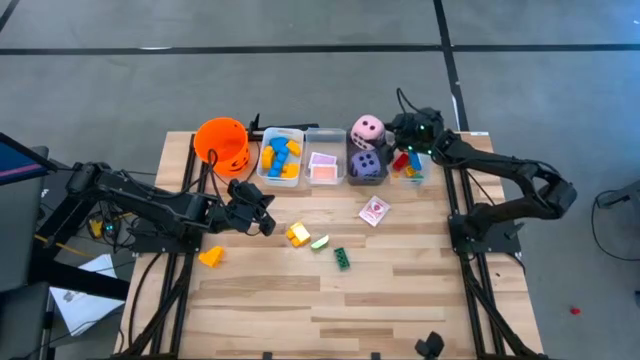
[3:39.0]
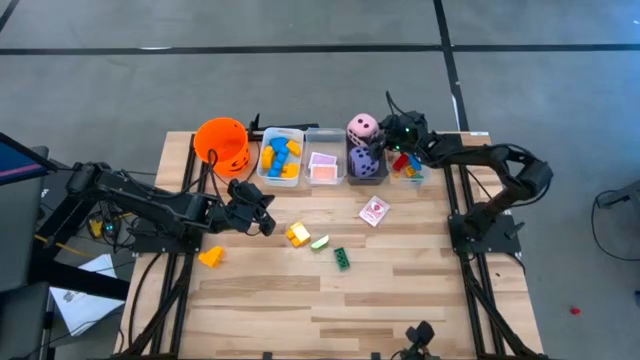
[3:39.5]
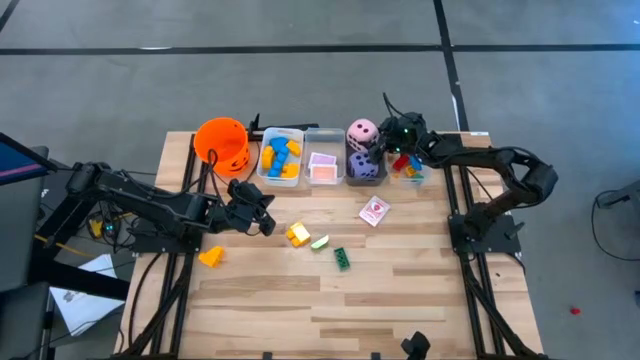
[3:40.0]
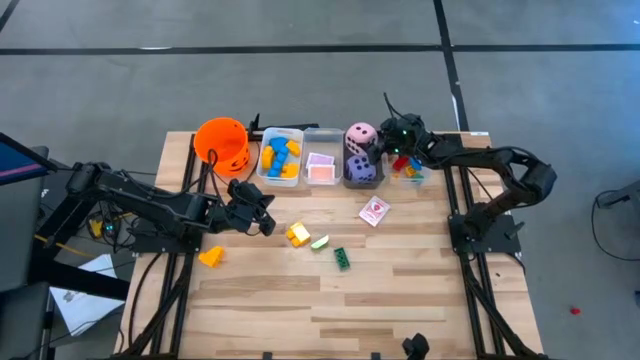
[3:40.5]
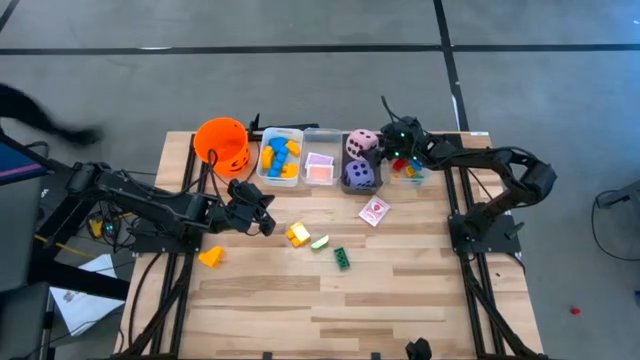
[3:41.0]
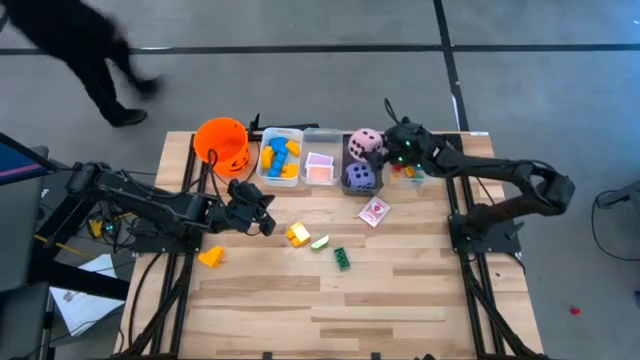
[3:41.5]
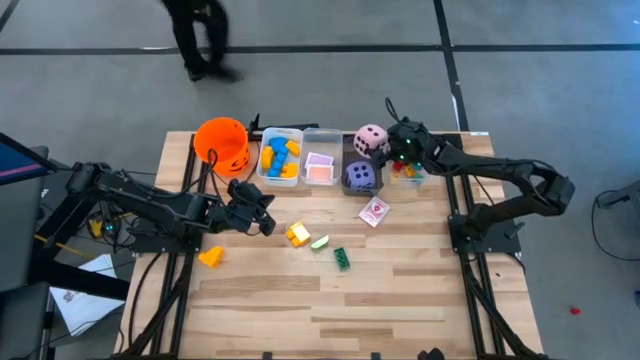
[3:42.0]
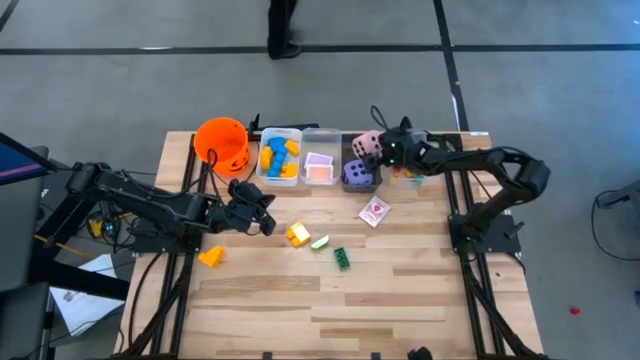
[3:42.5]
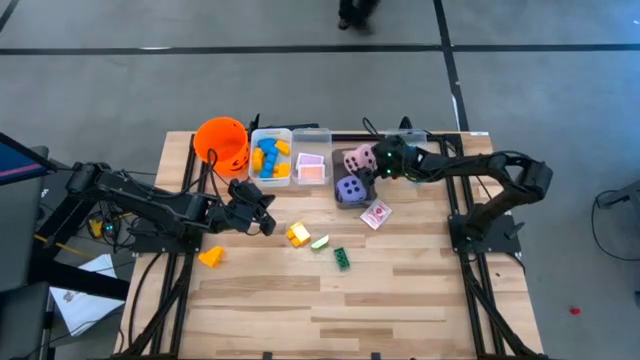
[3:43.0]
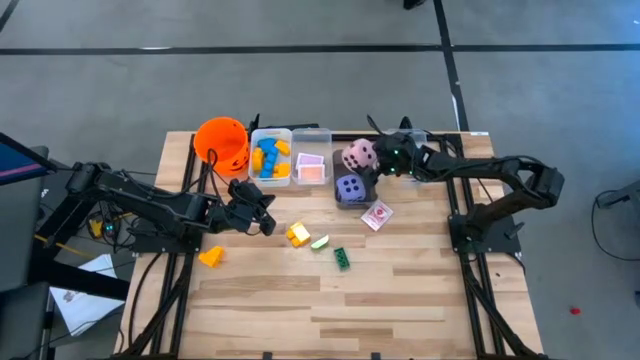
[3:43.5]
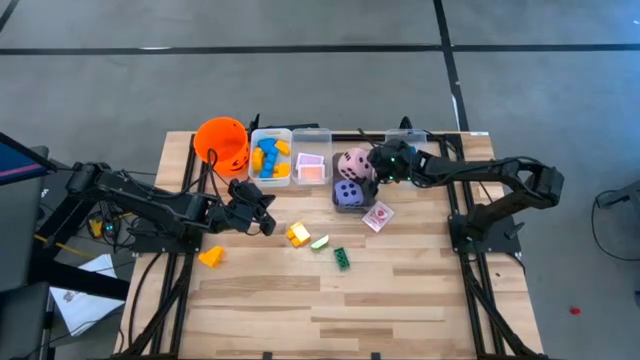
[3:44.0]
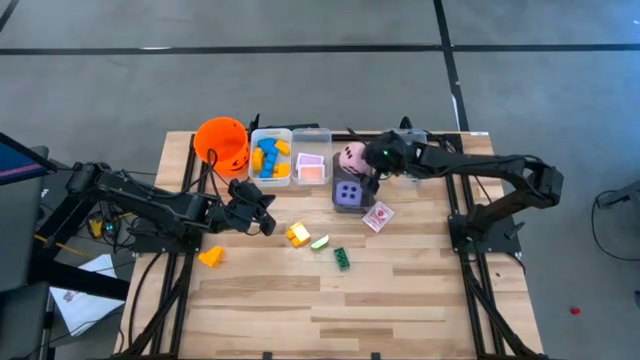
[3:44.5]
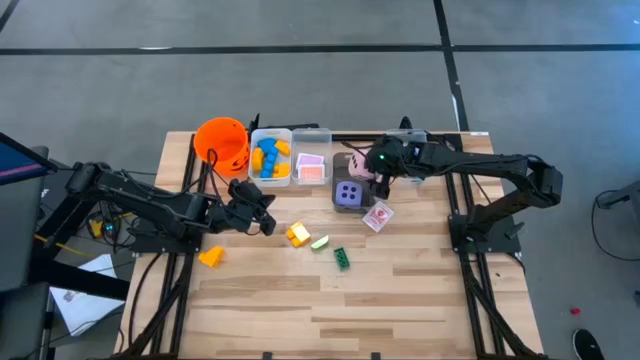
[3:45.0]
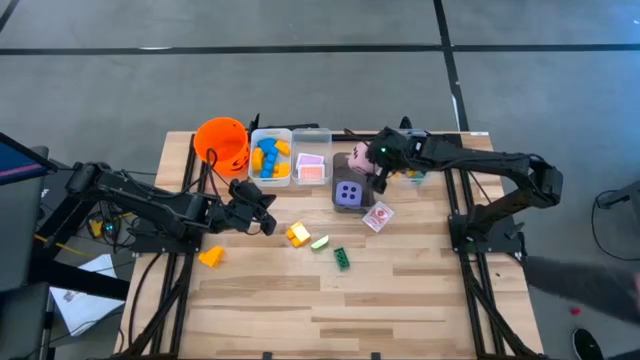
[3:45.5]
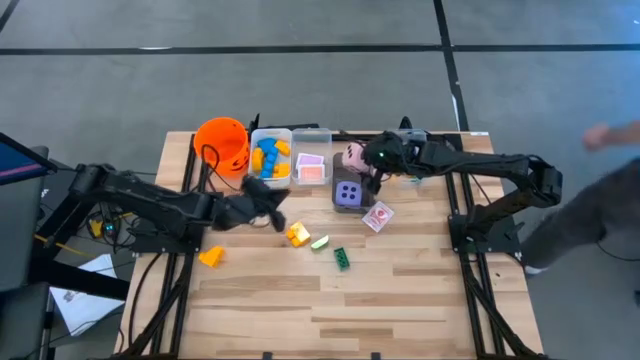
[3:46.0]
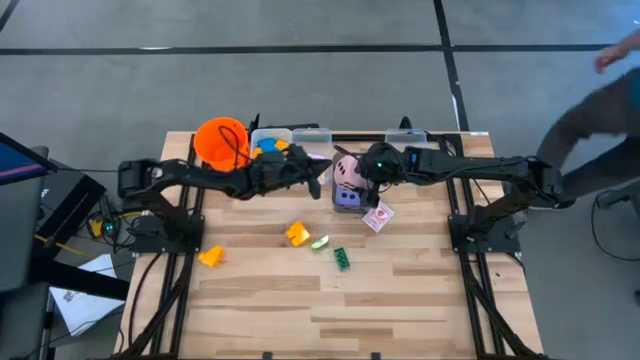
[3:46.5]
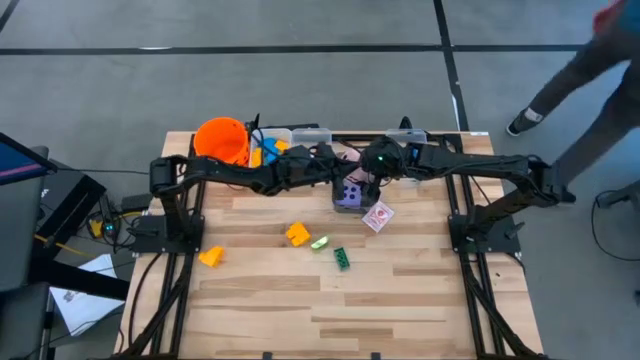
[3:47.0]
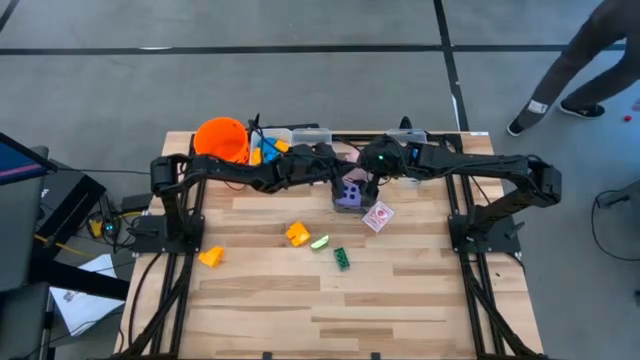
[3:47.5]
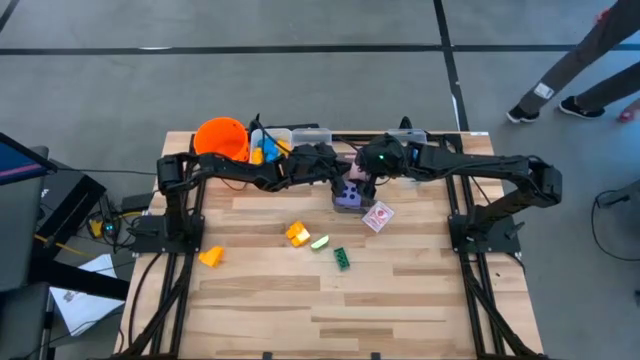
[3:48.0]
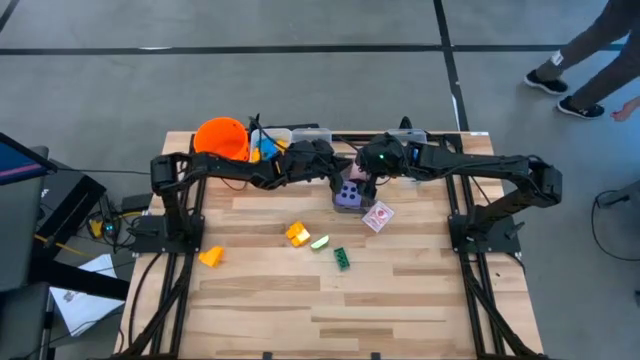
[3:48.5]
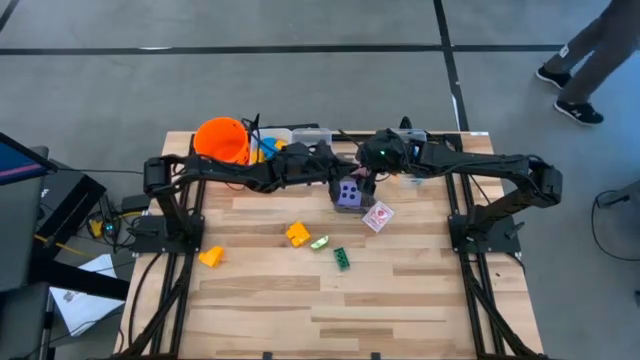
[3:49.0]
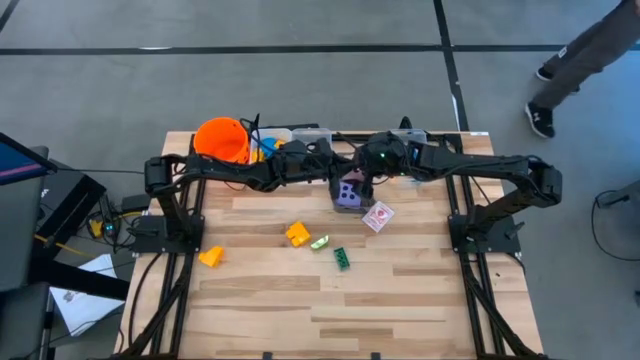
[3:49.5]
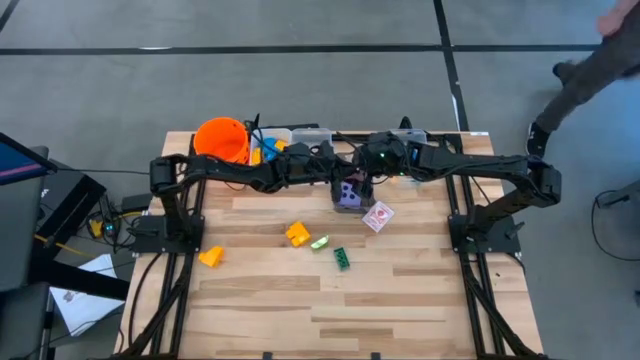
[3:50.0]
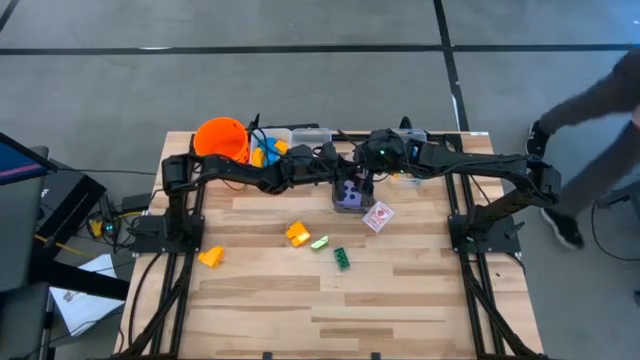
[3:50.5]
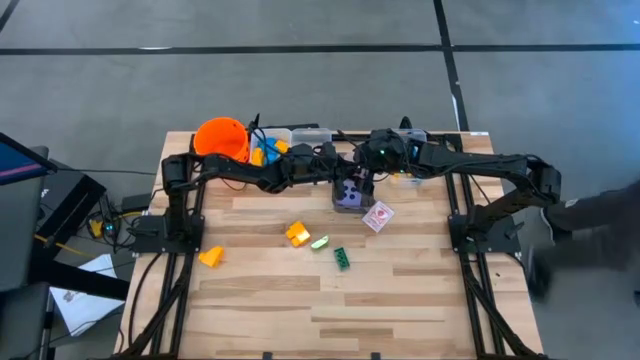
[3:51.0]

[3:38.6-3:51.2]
Task: Pick & Place Toys
Put the pink dice into the black bin

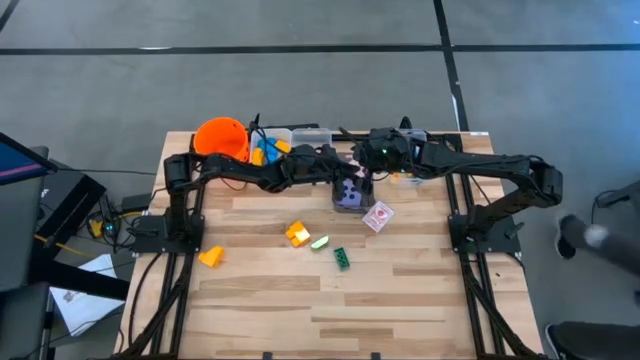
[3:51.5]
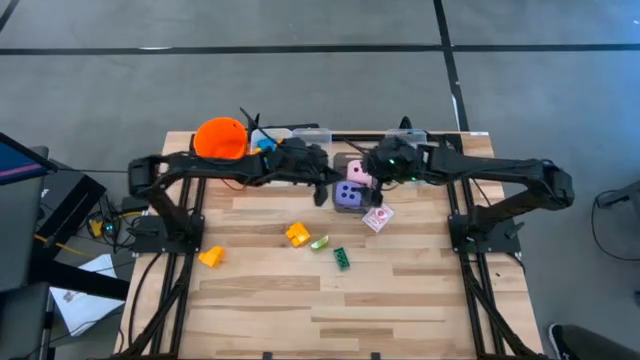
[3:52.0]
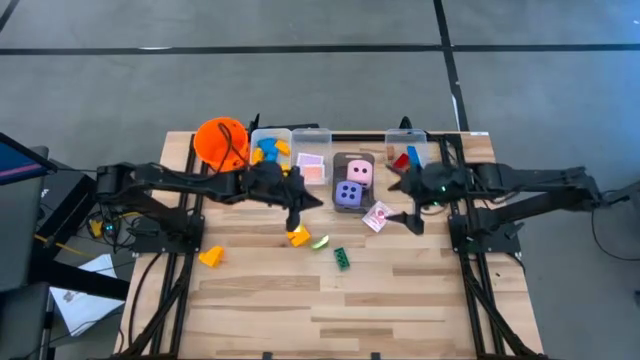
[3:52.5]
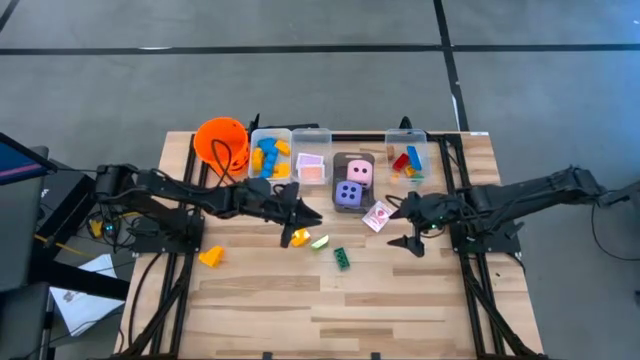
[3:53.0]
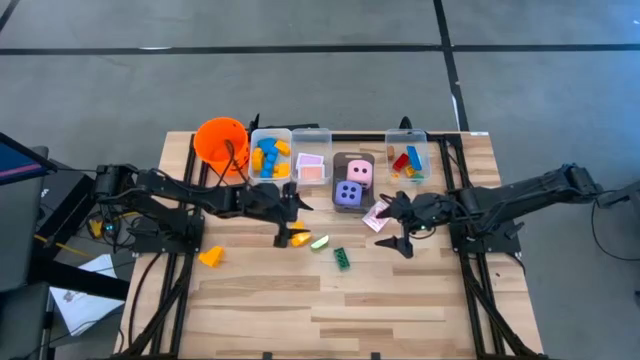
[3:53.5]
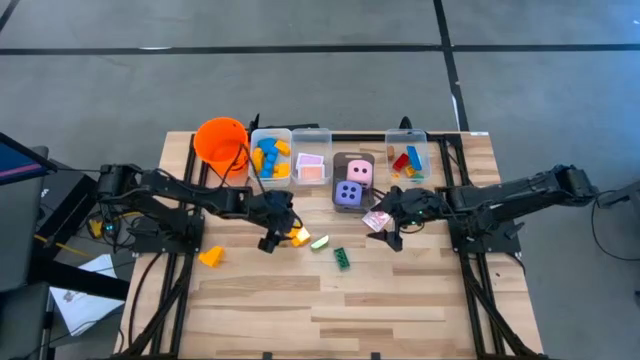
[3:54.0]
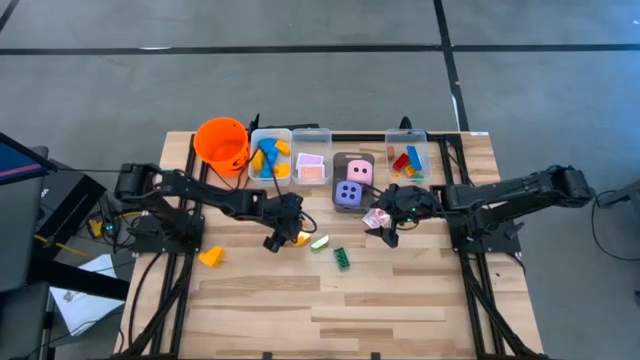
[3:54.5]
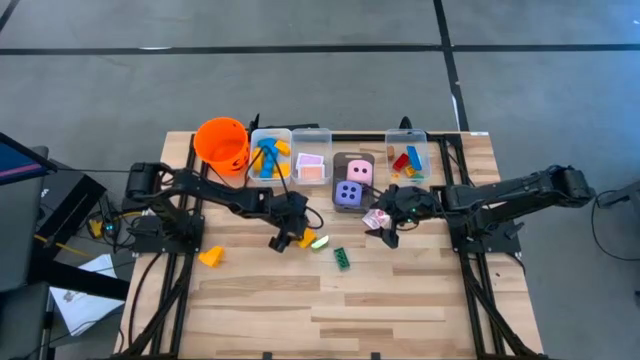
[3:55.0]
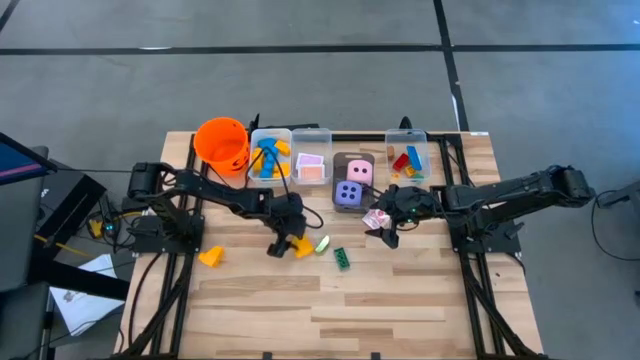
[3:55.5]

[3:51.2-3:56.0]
Put the right big yellow game piece into the white bin

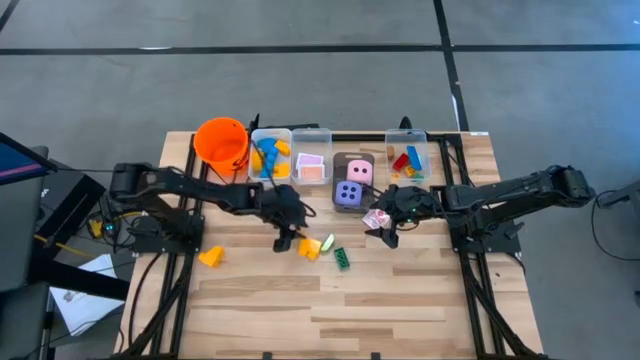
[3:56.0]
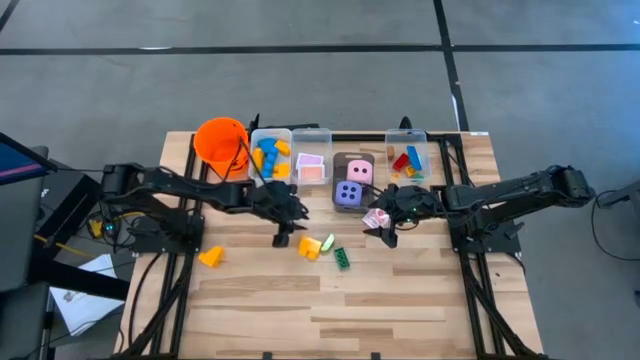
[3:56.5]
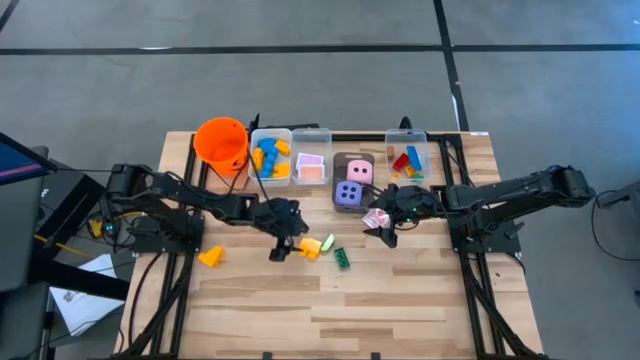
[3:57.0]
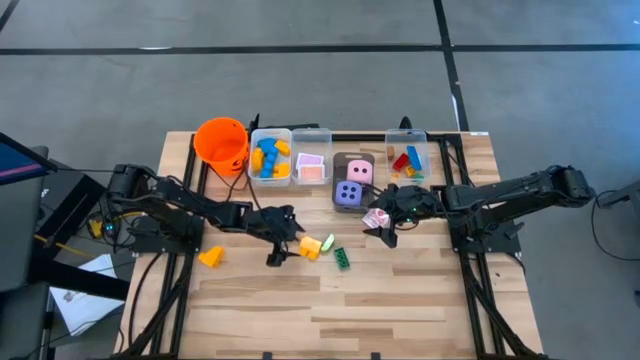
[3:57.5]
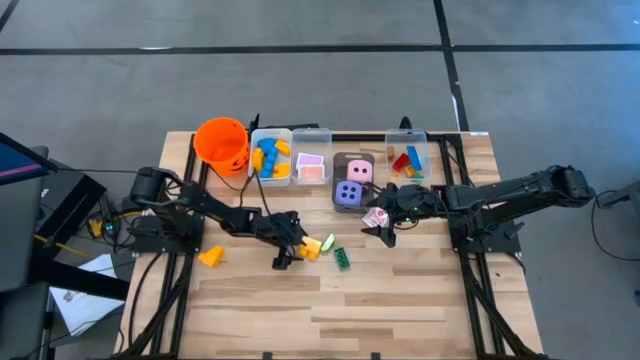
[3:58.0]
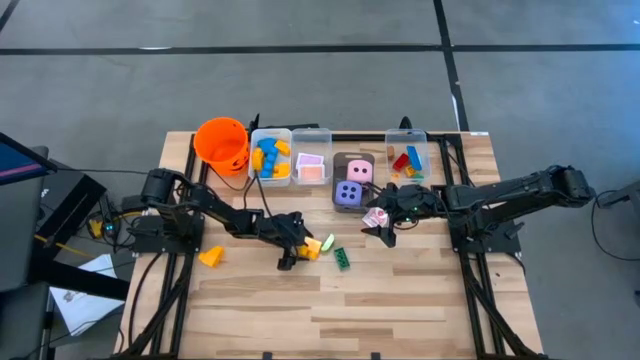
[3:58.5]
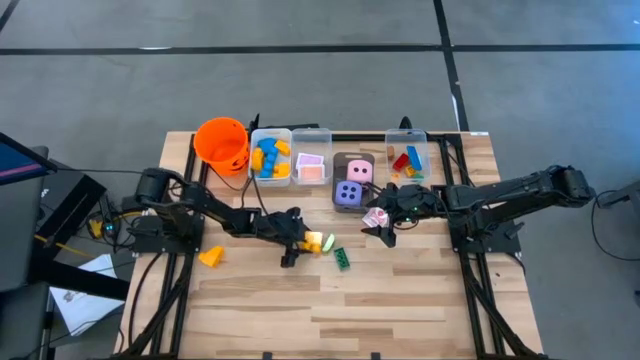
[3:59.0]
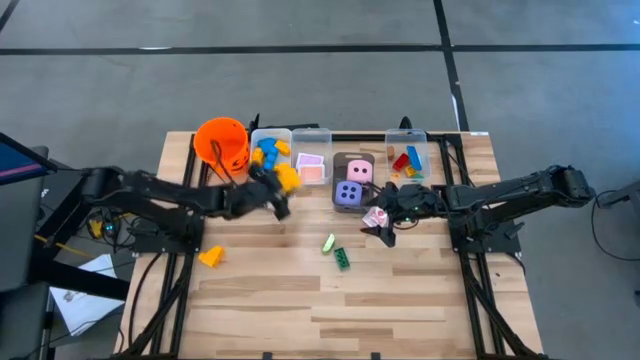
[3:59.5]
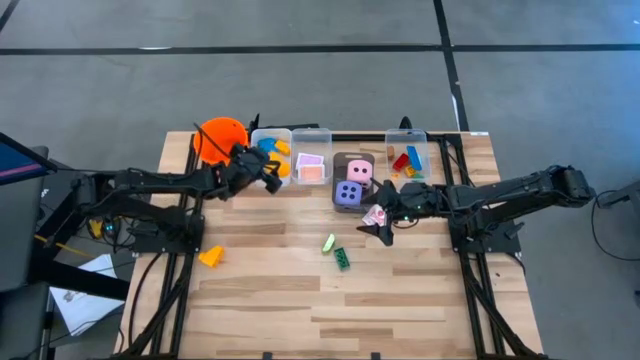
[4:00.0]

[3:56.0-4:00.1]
Put the right big yellow game piece into the white bin
